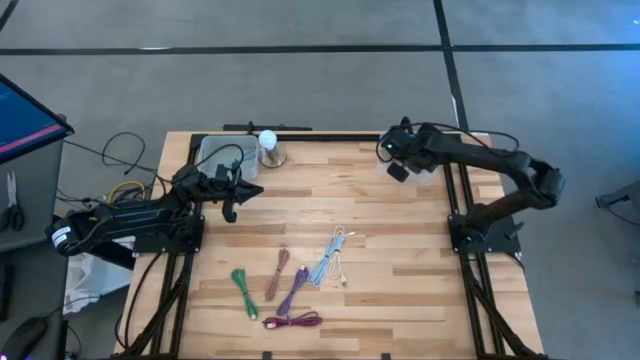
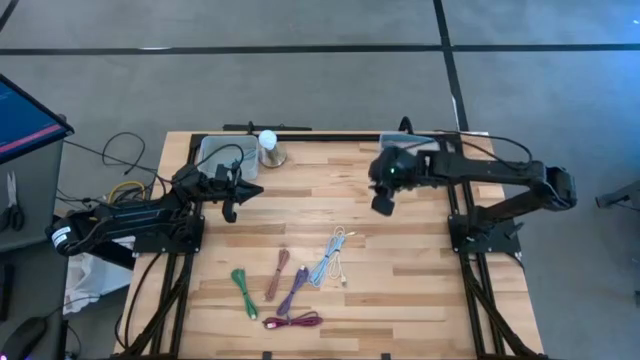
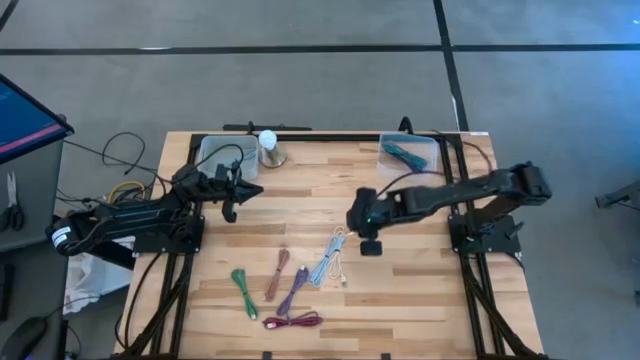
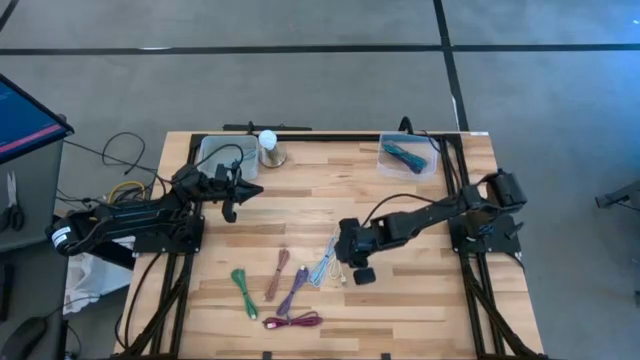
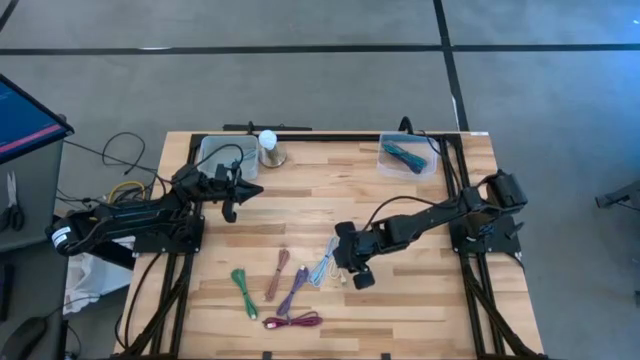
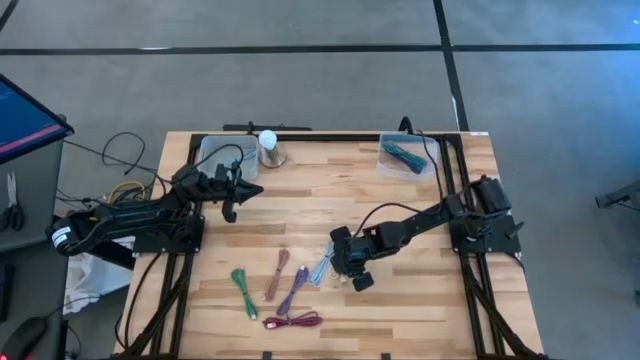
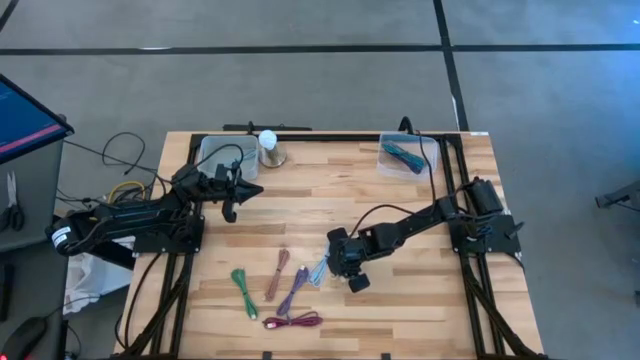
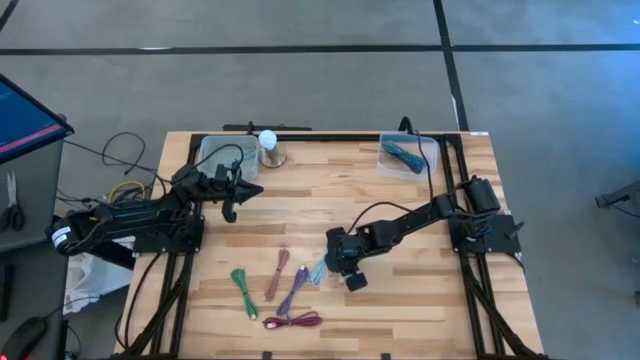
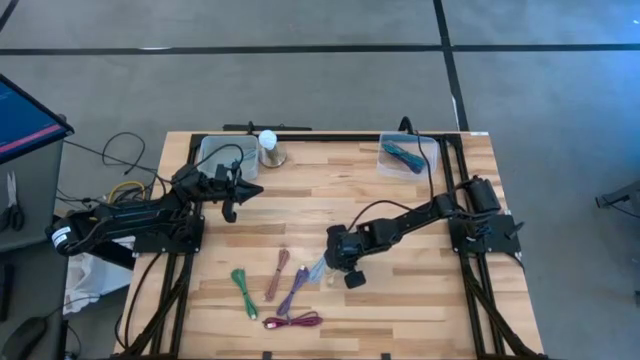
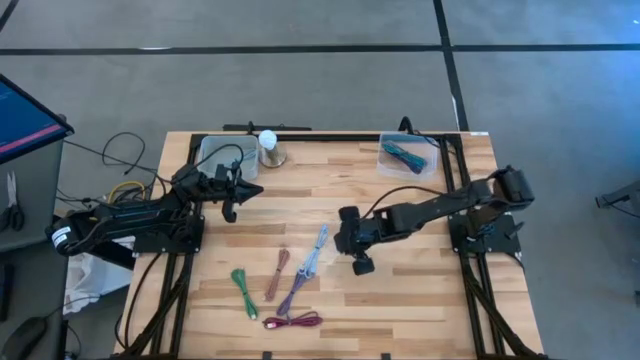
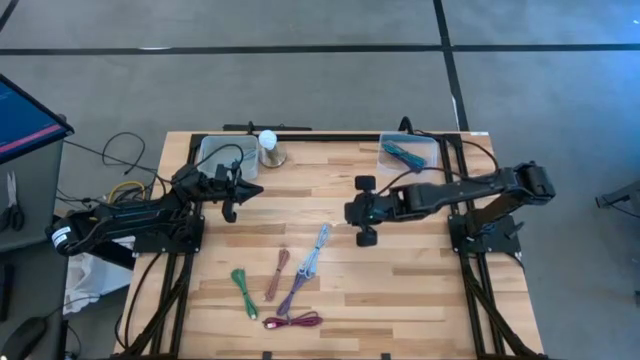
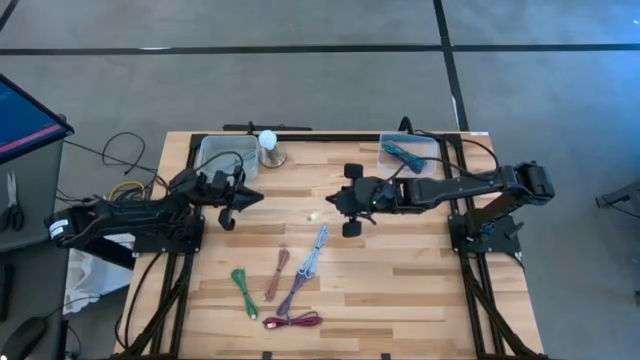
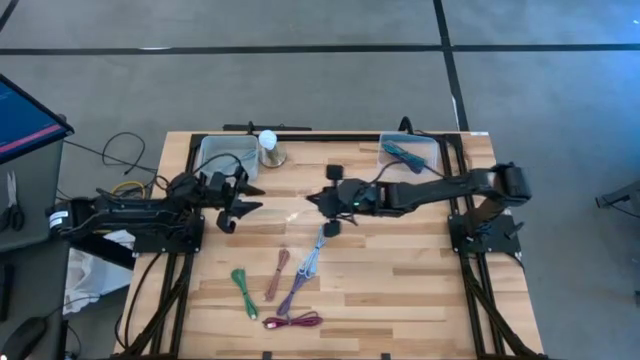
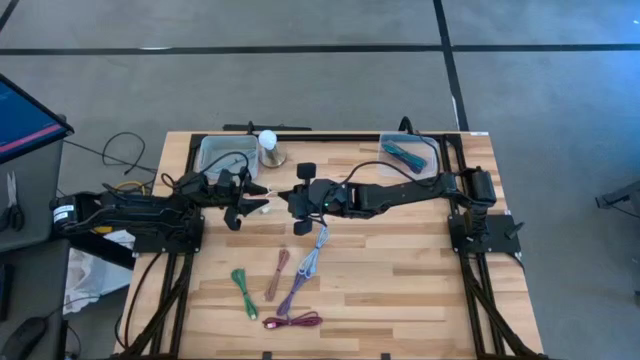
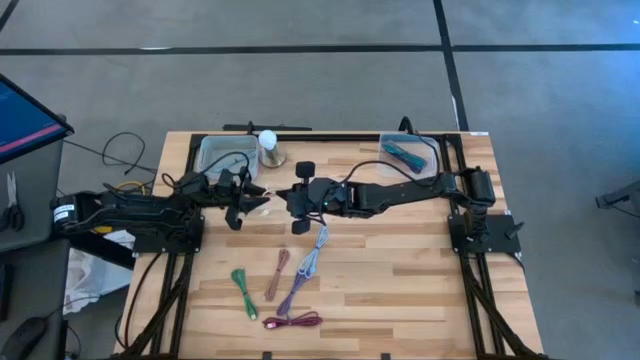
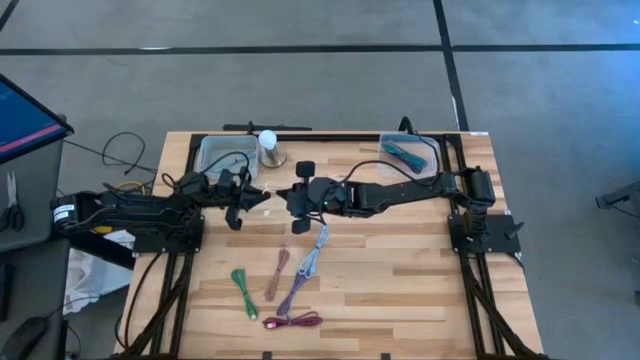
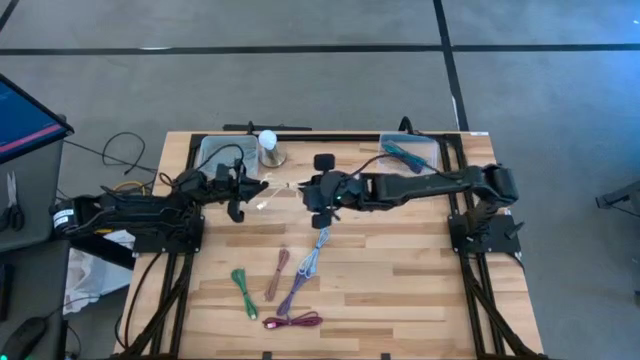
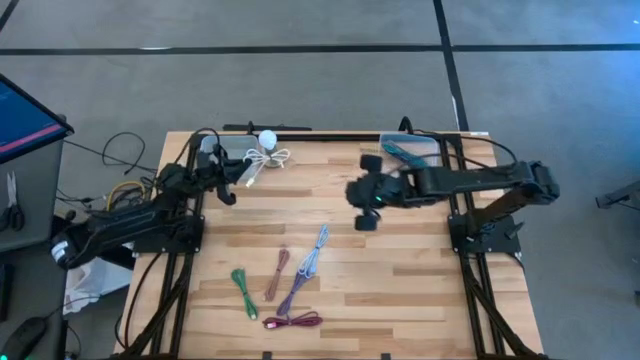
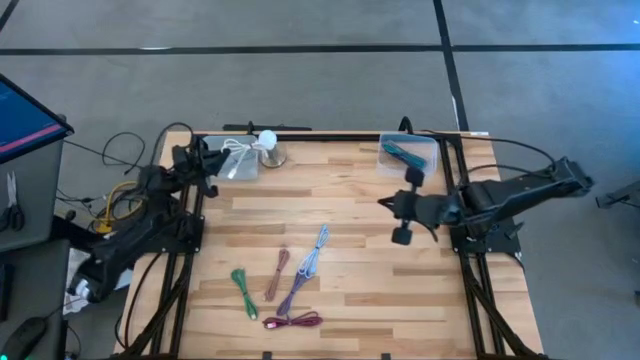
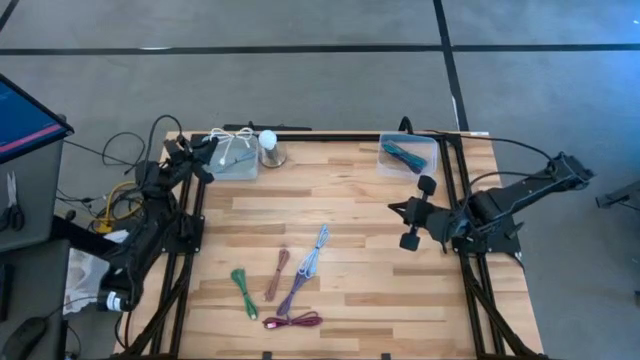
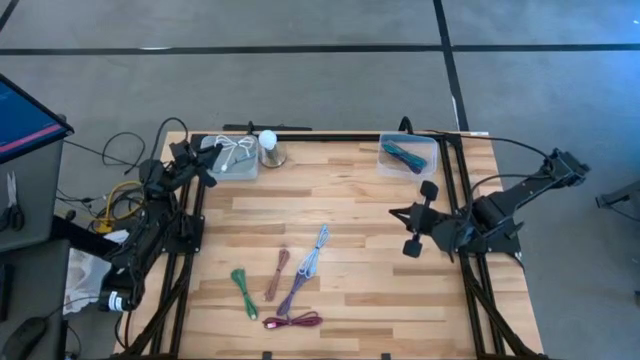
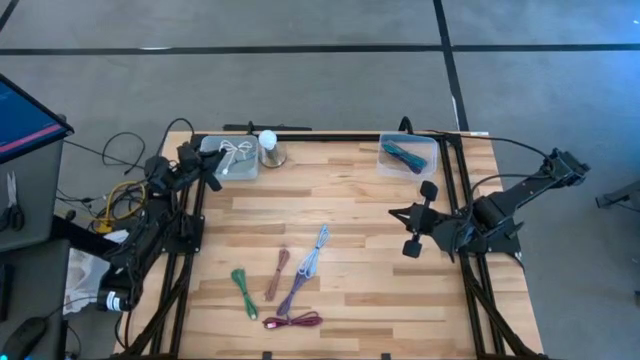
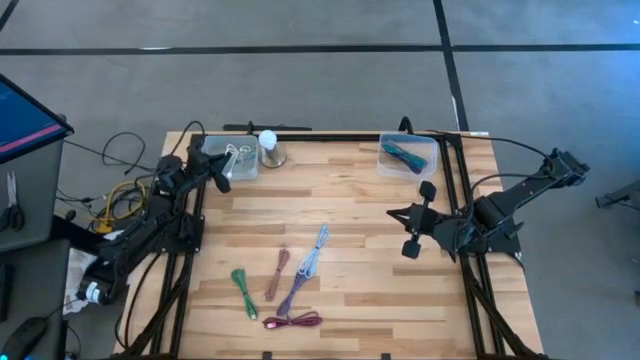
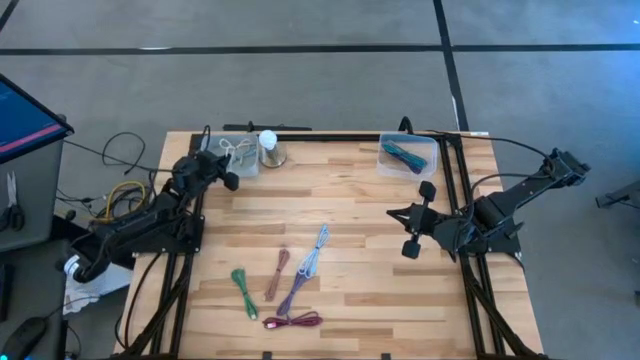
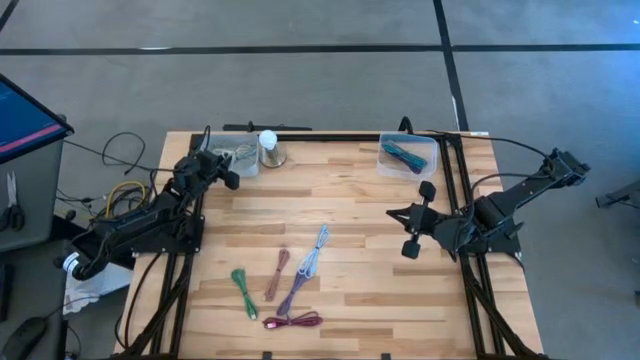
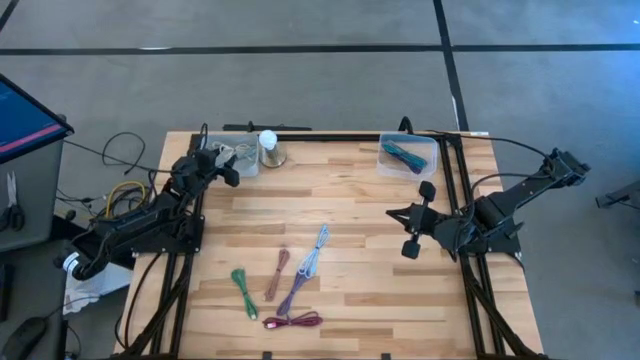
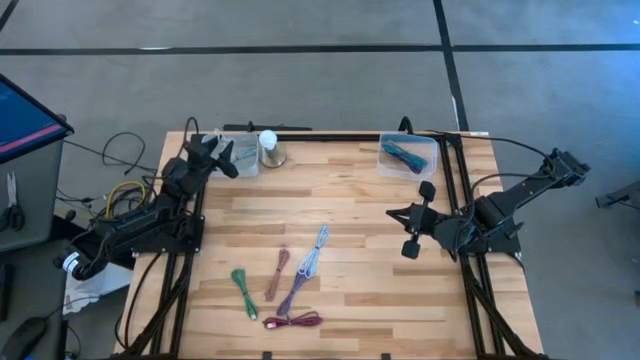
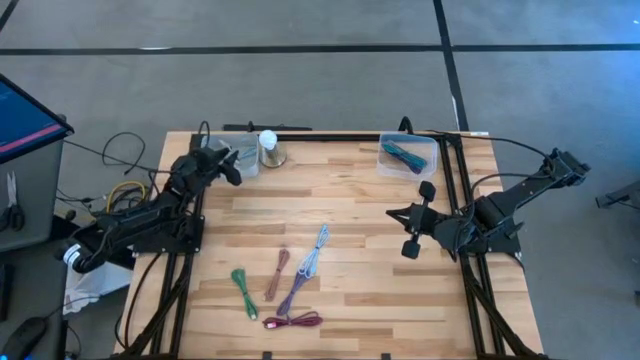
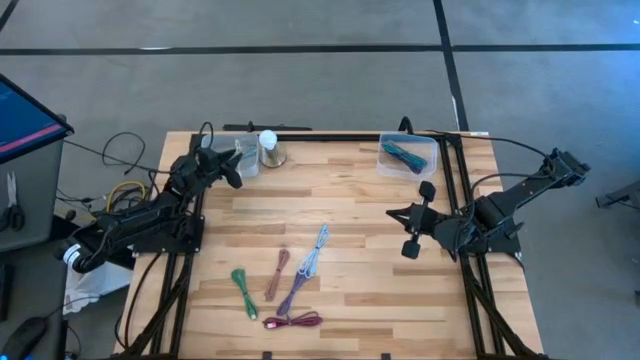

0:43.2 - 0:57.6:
Task: Pick & Place USB Port
Put the white charger cable into the gray bin

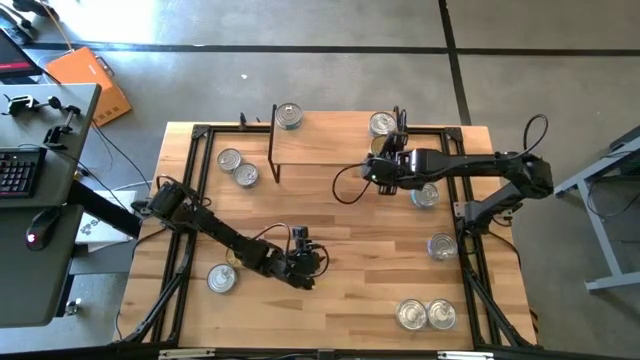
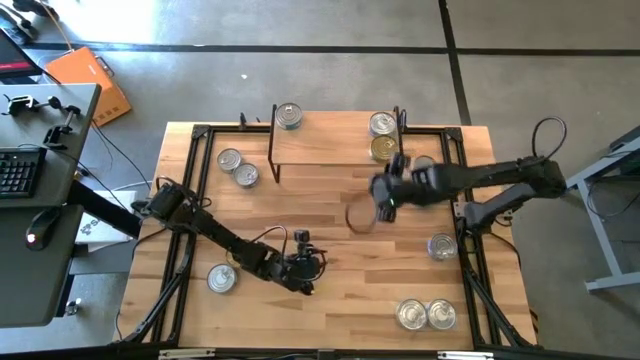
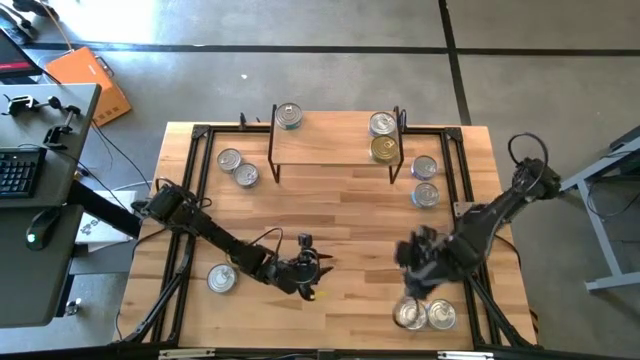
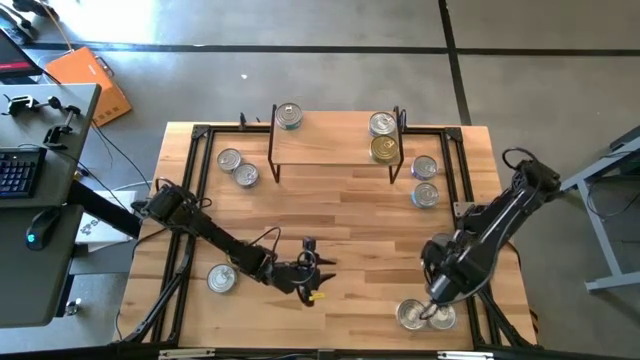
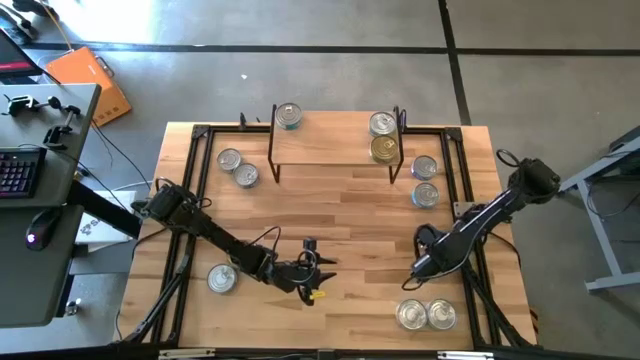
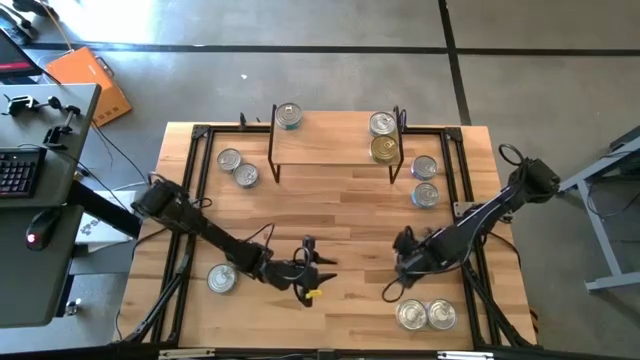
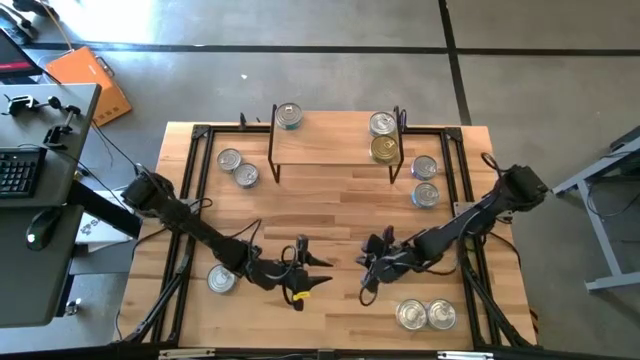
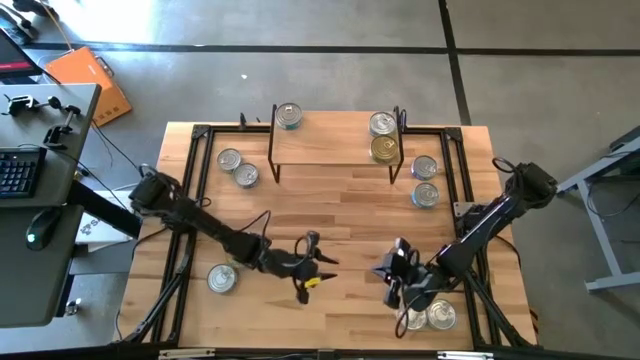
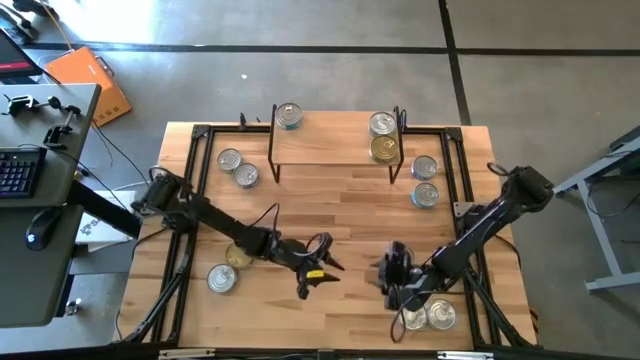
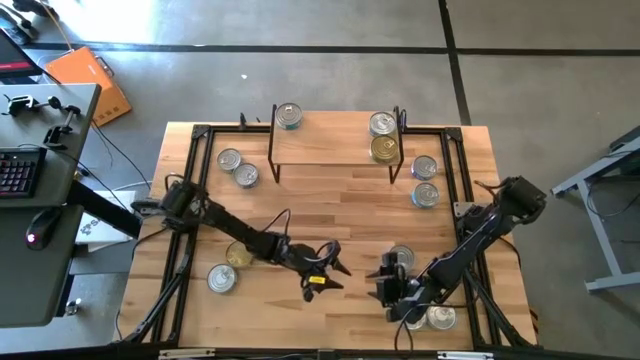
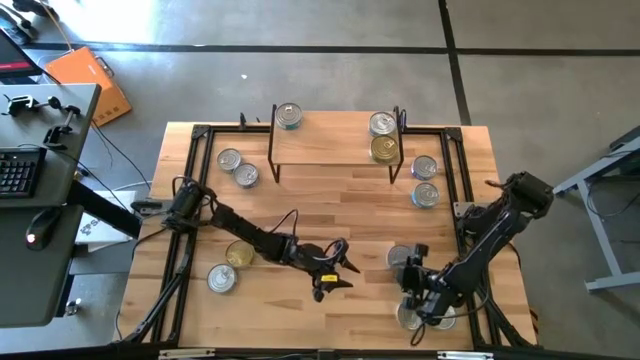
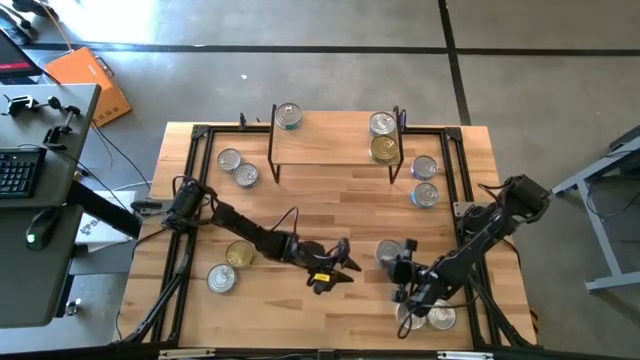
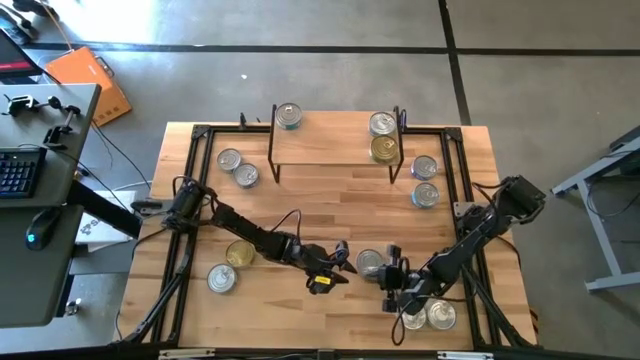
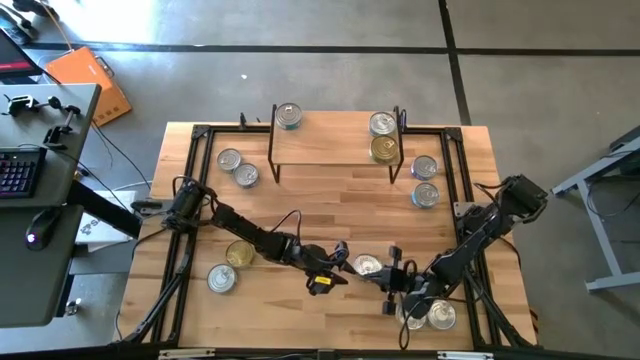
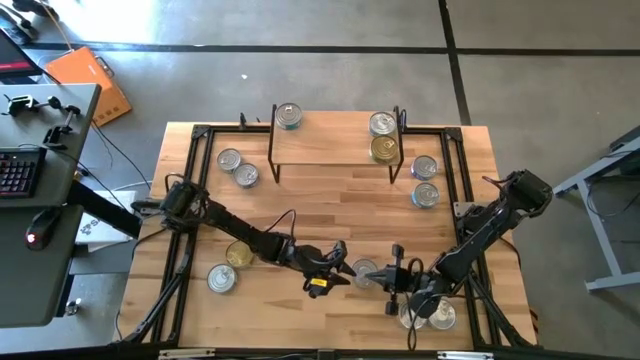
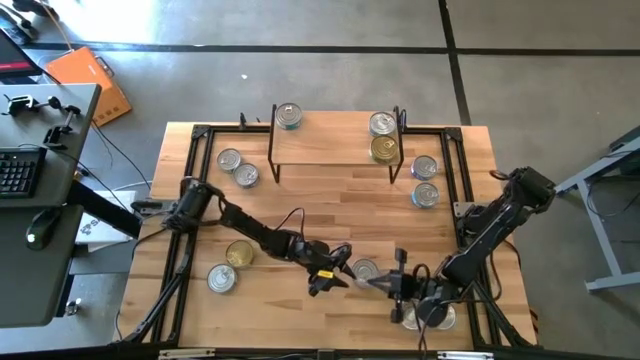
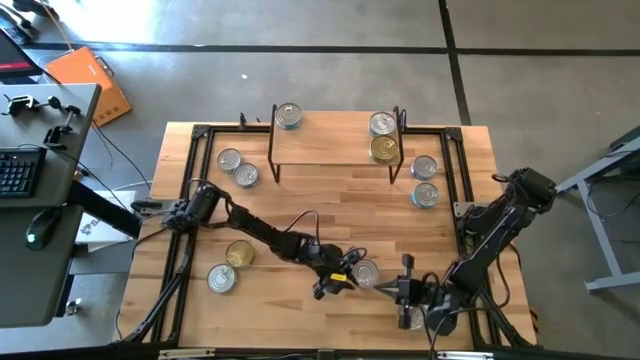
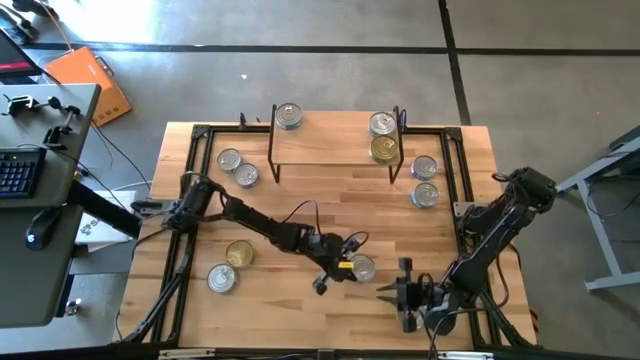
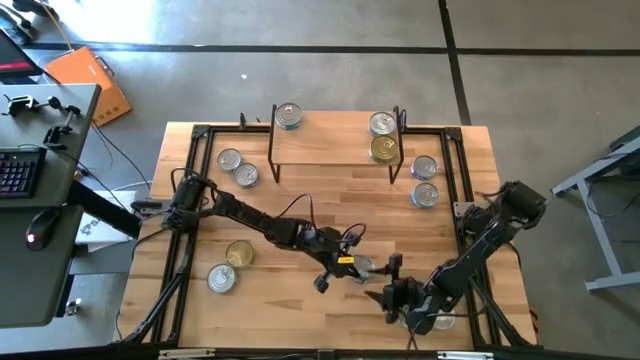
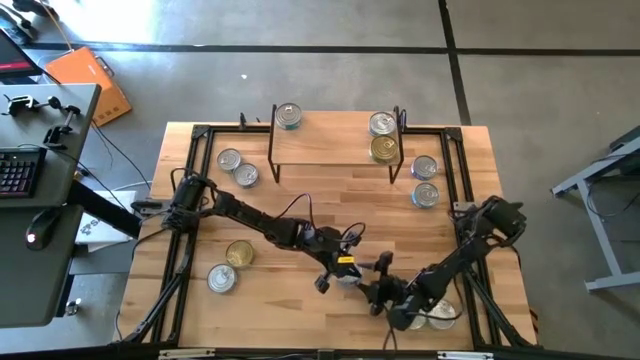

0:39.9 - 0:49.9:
Task: Stack canned seafood by type on shelf
Put the blue tuna can on the shelf
